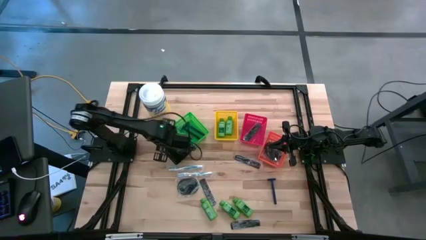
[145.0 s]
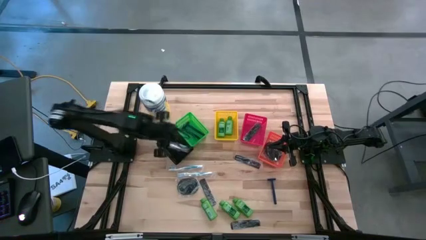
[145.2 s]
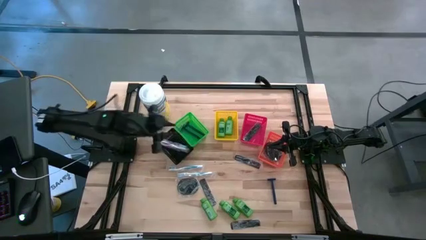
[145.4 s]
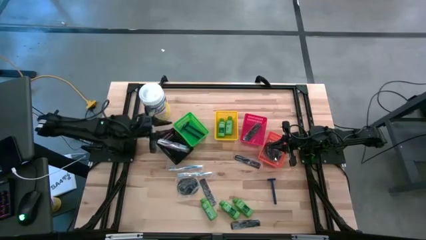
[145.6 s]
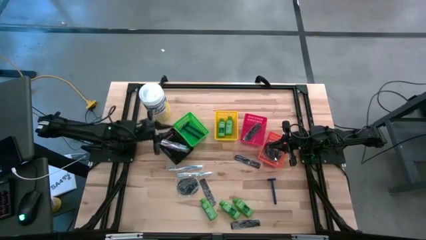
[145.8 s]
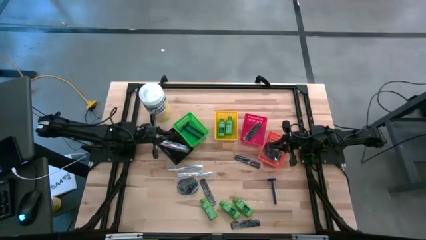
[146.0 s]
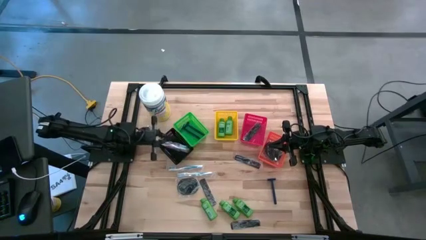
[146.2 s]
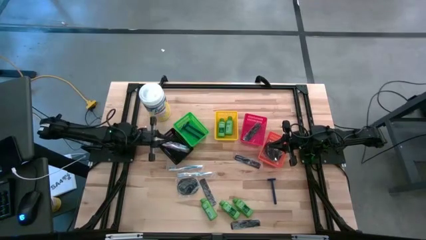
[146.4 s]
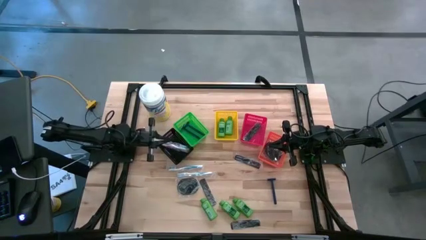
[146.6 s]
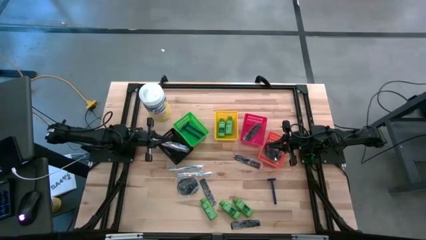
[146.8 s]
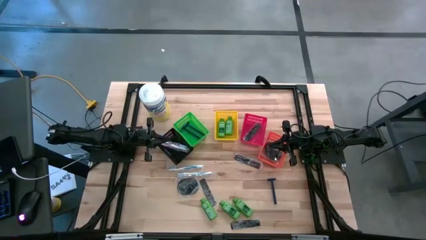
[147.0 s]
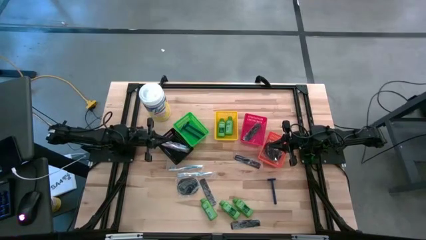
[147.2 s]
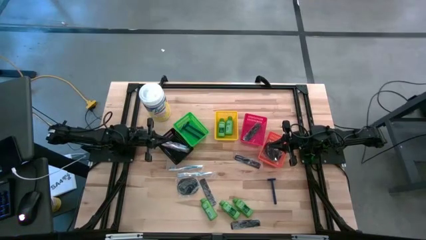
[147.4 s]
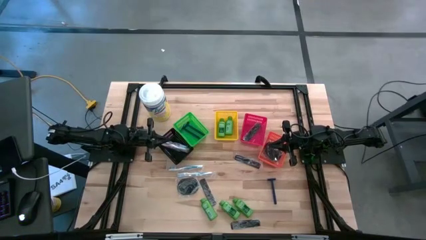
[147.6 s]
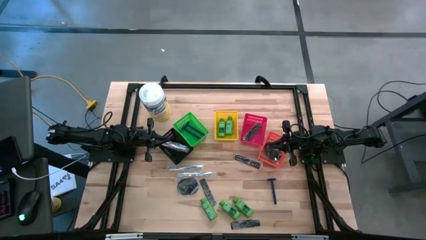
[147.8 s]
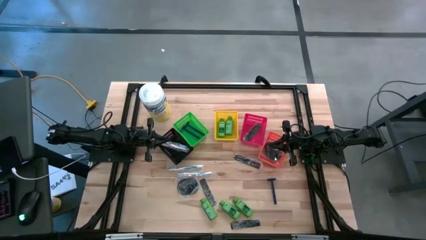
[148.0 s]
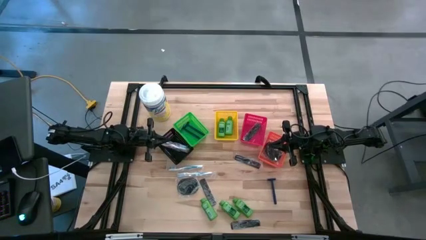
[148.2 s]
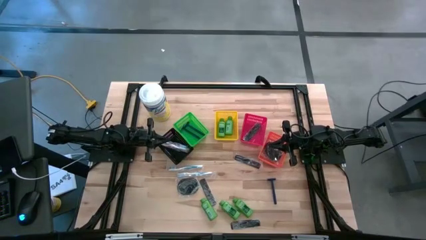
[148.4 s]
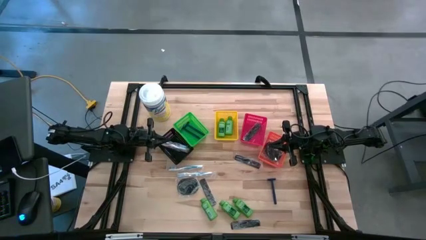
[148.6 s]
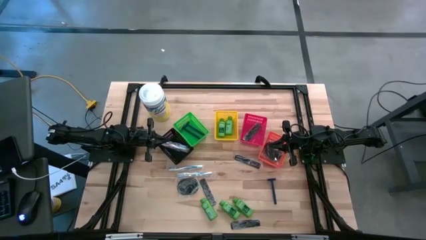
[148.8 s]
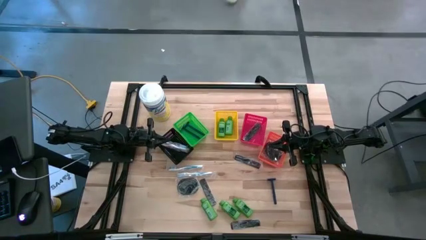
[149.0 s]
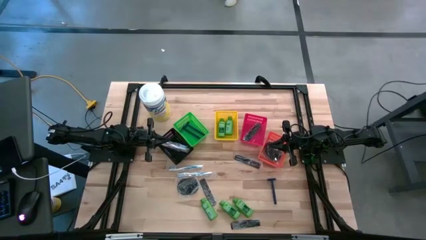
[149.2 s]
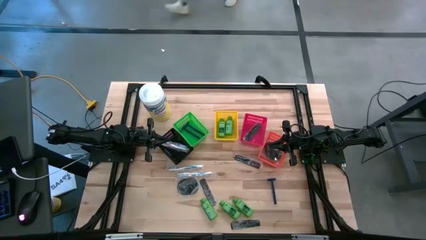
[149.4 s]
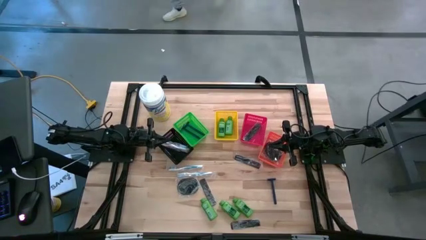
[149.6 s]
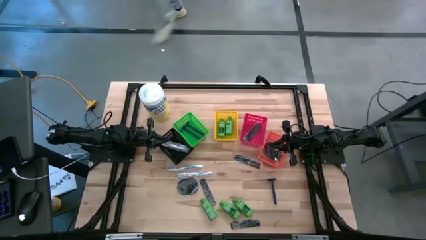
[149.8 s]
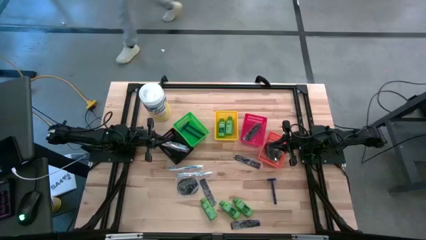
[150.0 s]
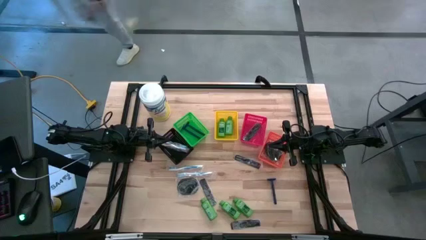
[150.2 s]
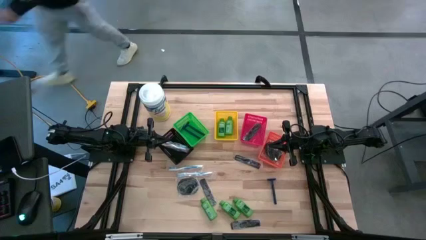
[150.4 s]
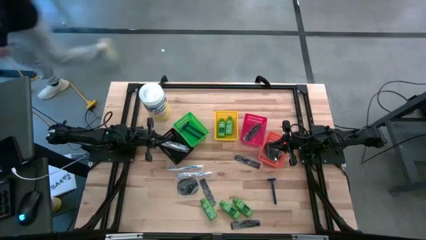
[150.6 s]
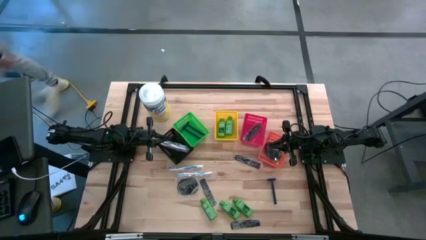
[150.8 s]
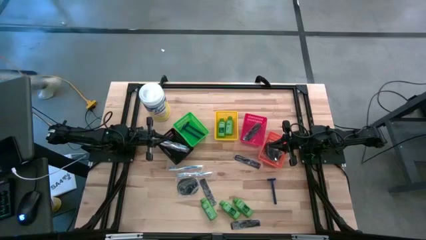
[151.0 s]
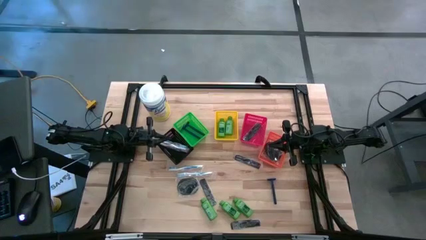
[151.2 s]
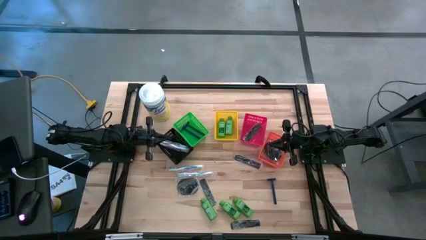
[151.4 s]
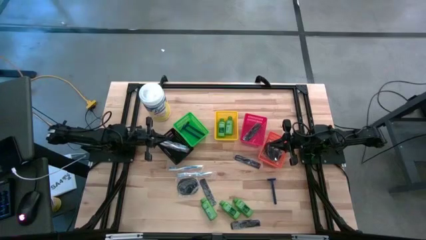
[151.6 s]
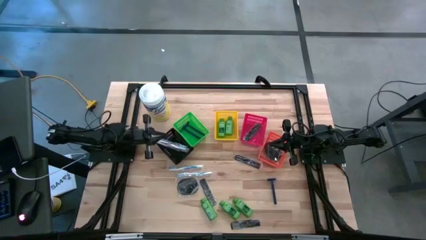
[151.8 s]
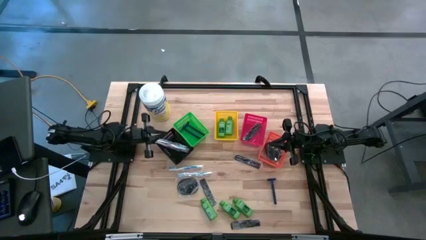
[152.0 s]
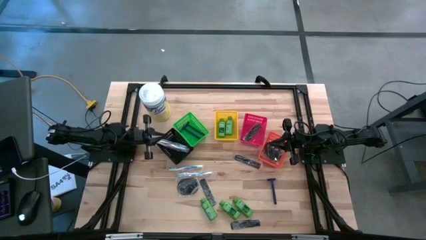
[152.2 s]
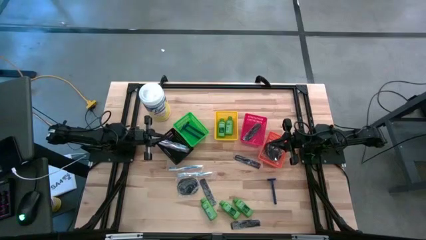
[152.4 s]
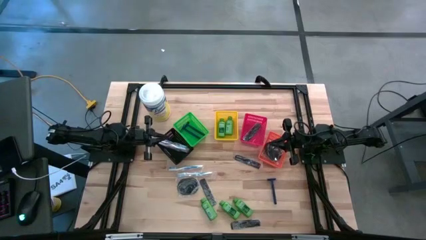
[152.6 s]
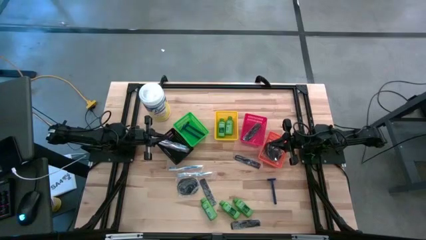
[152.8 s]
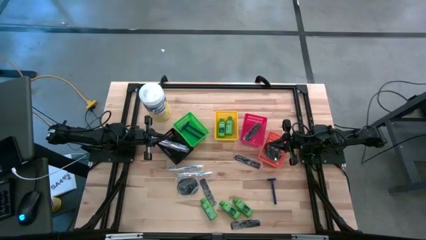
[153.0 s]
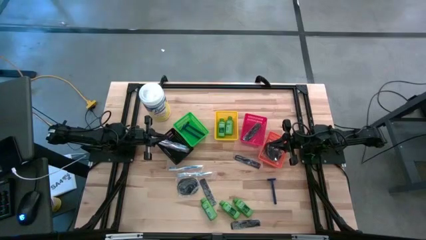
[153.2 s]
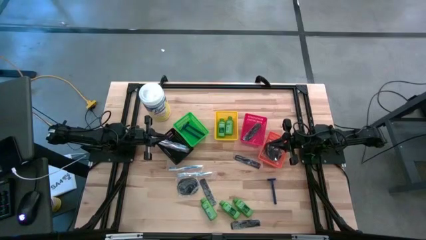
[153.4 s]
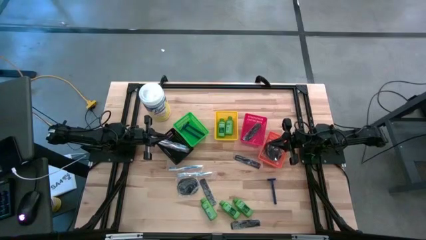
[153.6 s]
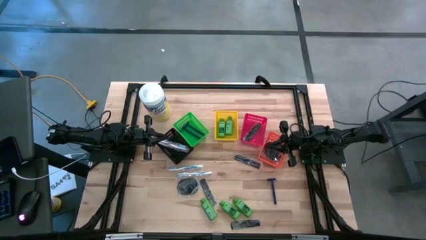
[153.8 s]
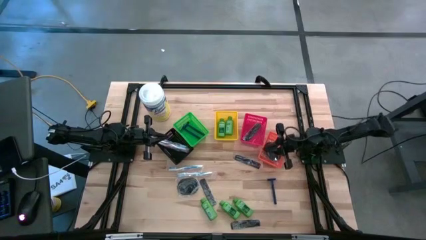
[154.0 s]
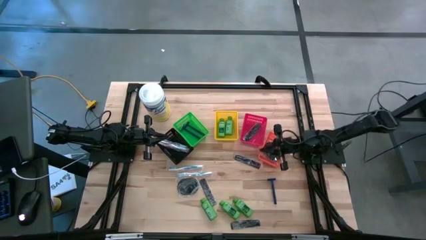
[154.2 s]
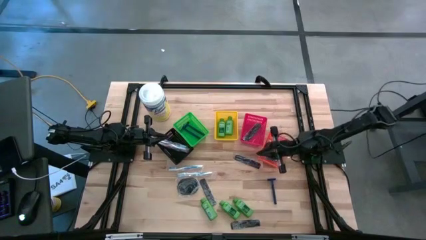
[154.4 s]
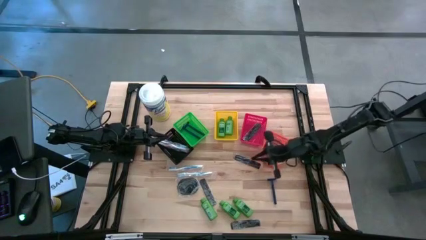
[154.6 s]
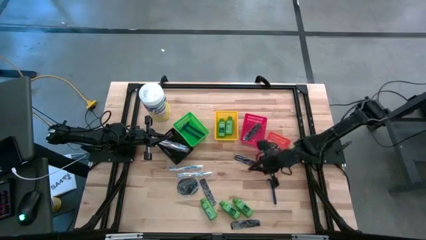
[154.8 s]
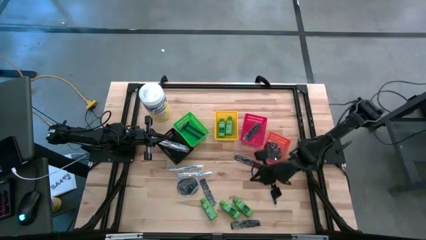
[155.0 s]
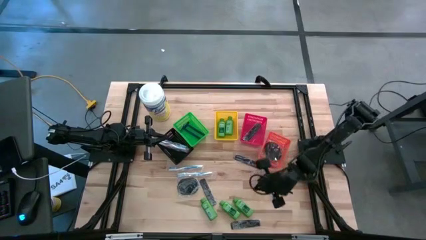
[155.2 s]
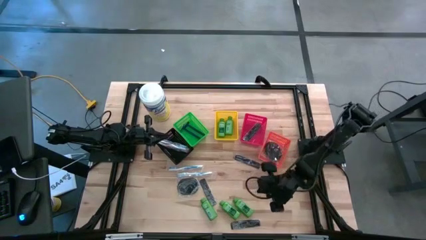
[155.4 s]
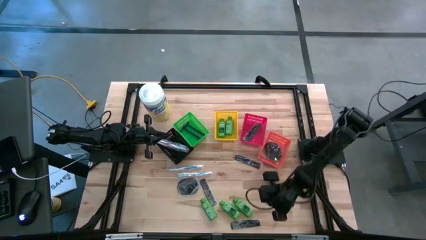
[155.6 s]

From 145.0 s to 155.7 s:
Task: Pick & Place Travel size toiletries
Put the bottom black hair comb into the red bin

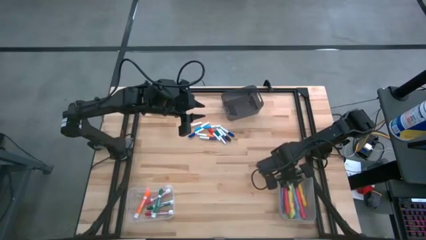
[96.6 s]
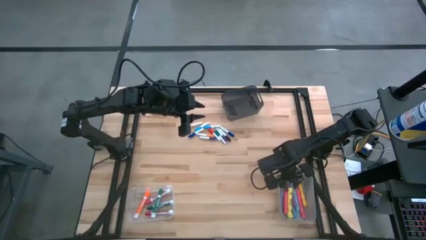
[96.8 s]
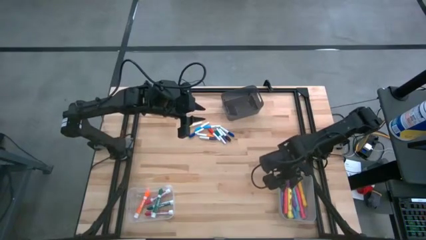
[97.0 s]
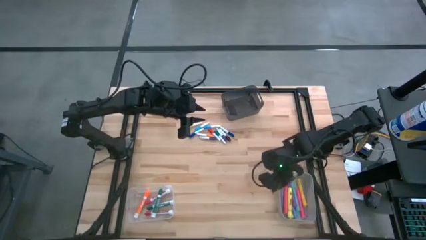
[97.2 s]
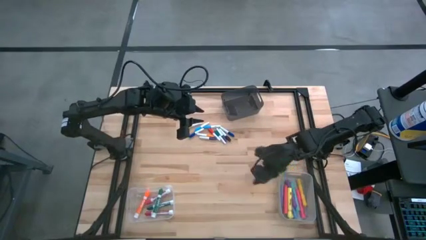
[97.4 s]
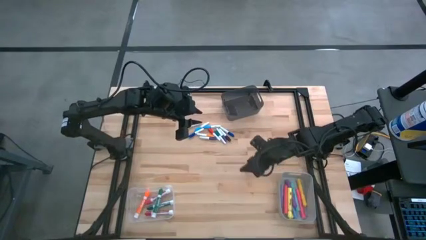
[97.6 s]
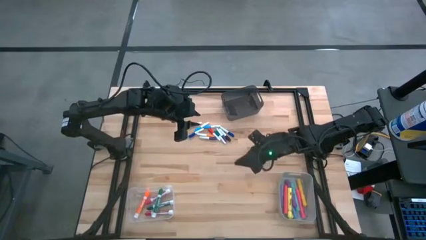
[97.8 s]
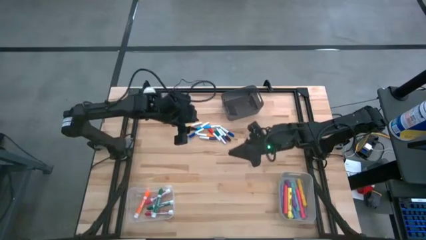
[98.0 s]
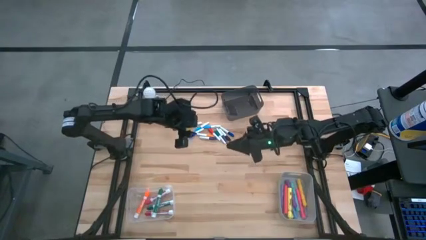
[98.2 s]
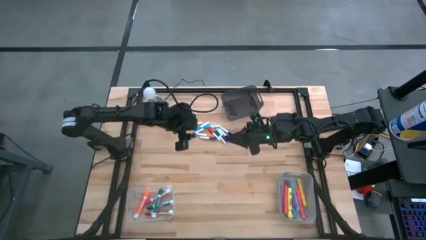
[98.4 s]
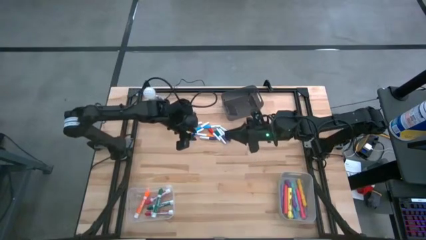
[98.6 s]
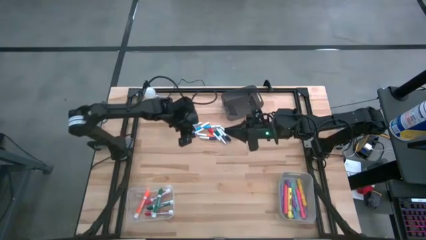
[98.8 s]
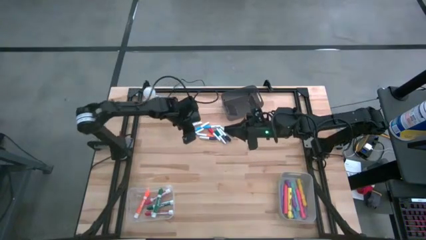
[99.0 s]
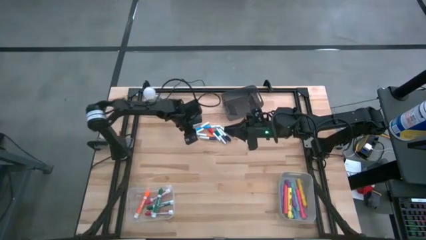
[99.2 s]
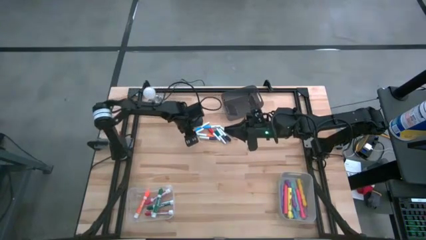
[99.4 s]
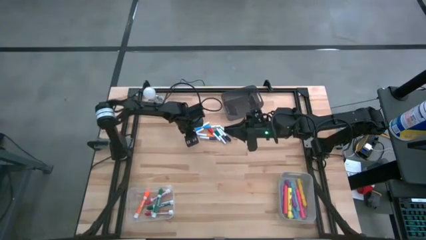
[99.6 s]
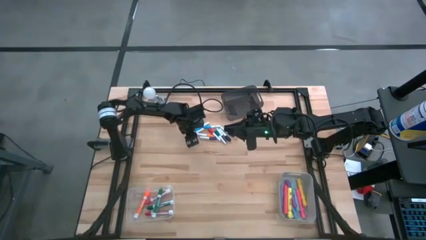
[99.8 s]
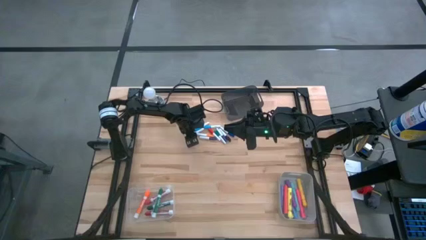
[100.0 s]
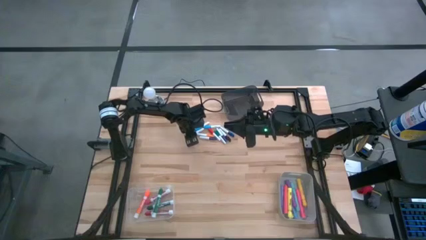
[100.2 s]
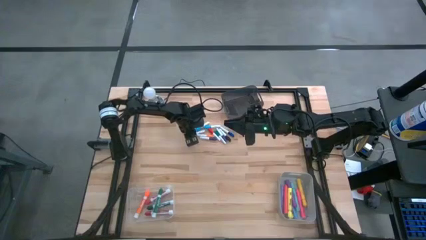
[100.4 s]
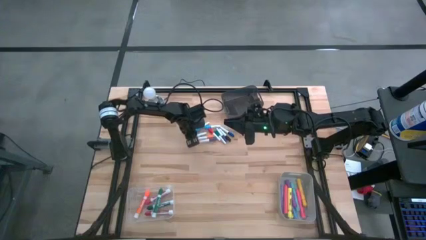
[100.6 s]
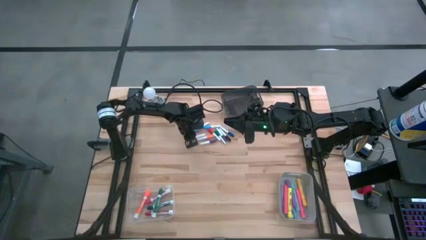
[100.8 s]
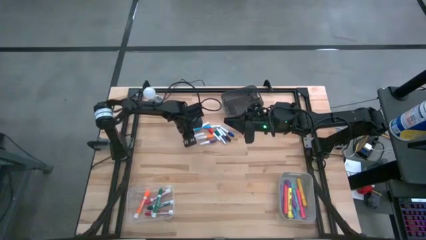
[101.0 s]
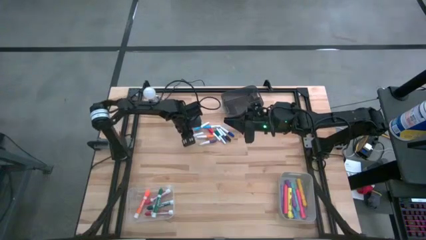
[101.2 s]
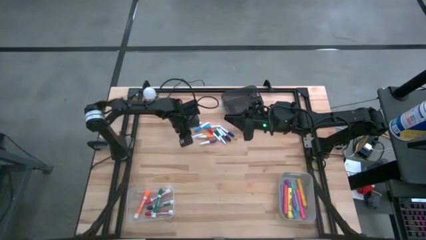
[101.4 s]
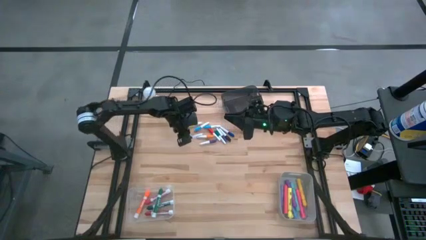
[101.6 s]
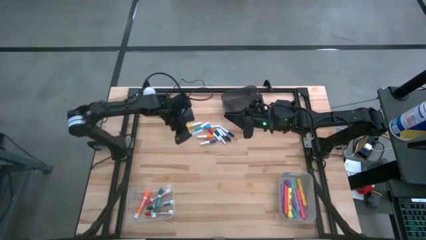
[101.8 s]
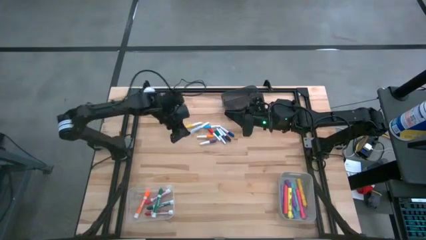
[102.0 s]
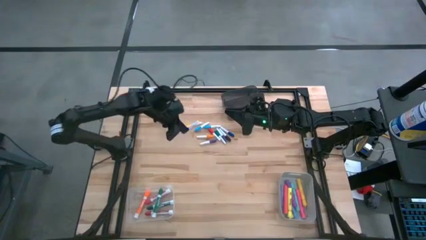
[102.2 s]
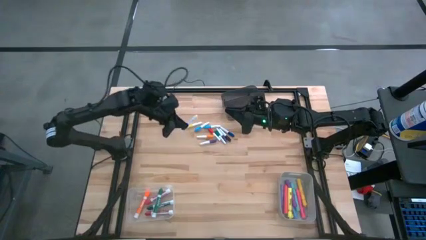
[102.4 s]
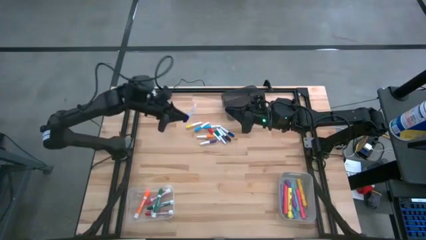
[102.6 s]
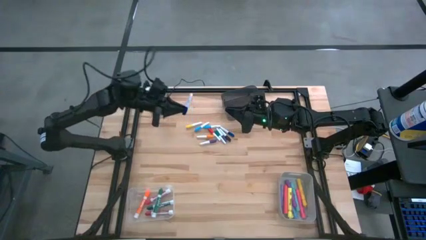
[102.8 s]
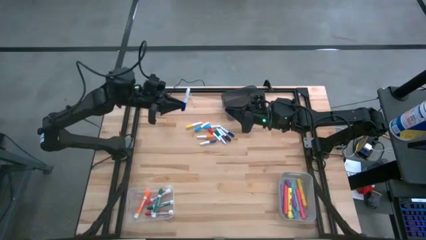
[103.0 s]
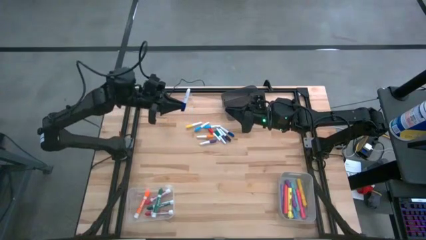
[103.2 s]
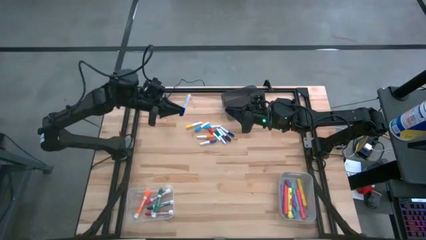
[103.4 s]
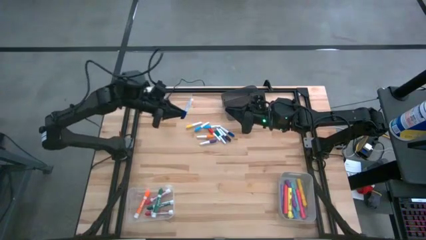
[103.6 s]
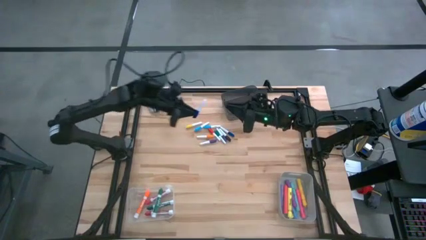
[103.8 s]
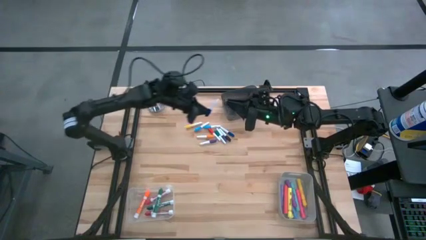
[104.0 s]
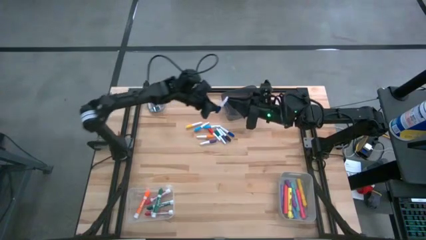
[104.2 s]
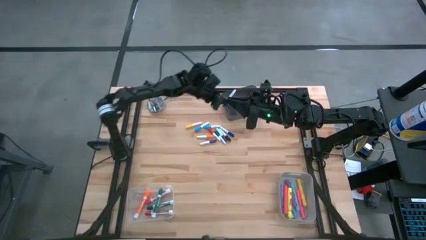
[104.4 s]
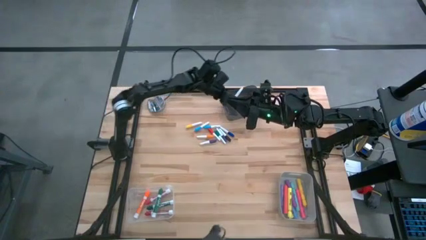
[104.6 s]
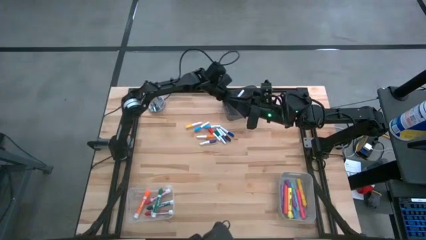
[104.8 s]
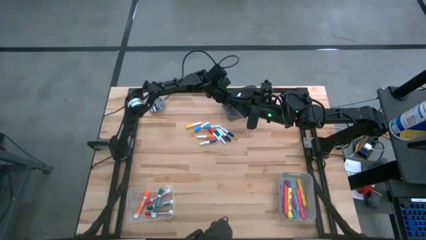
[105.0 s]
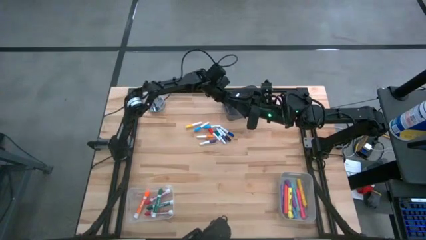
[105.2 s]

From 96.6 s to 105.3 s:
Task: Pick & Place Markers
Put the left small dark blue highlighter pen into the black bin
